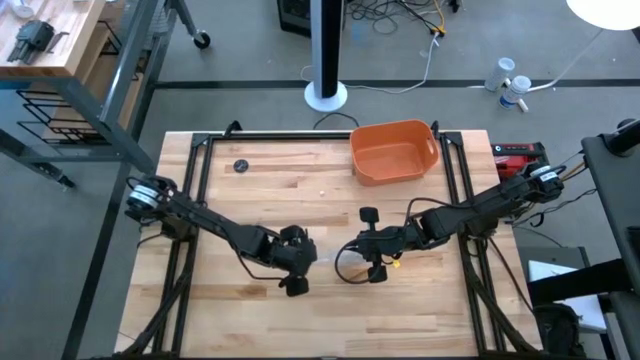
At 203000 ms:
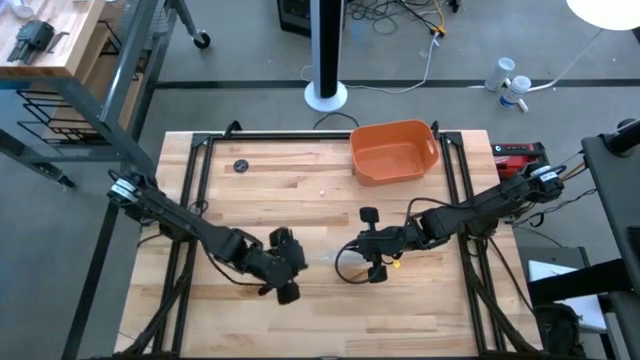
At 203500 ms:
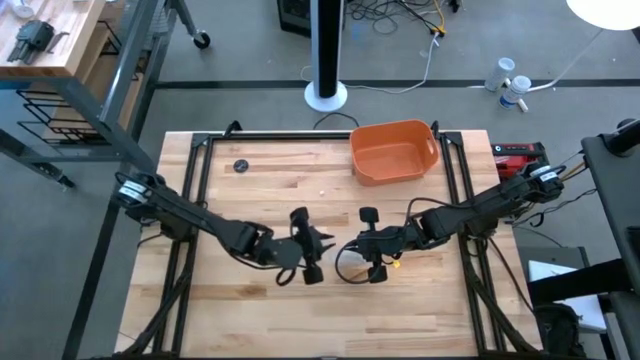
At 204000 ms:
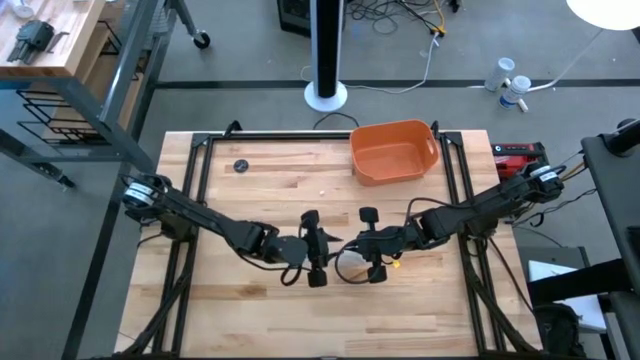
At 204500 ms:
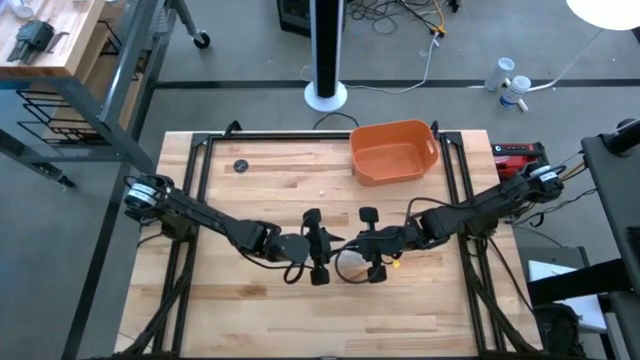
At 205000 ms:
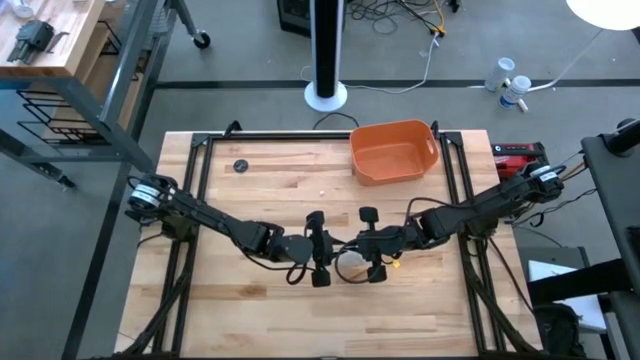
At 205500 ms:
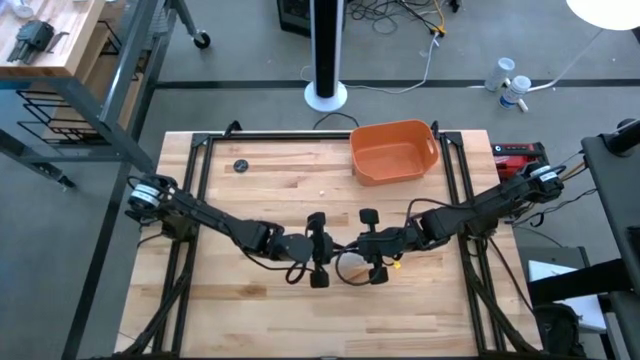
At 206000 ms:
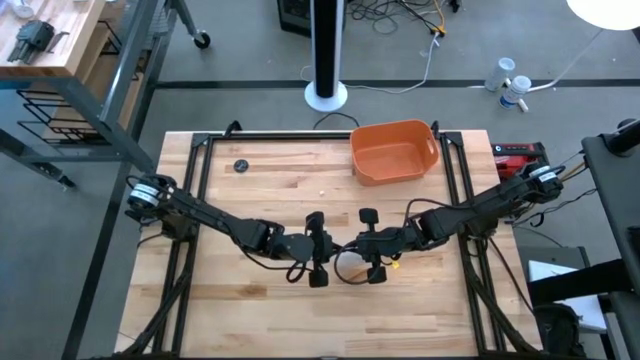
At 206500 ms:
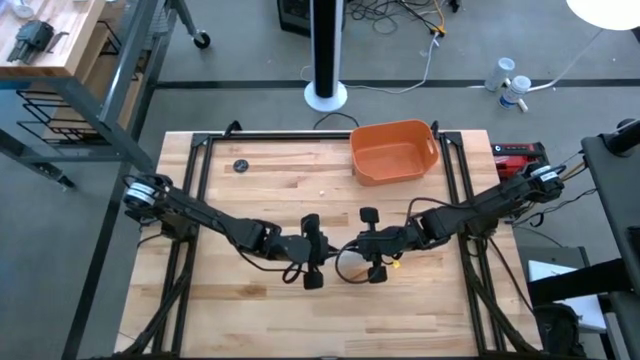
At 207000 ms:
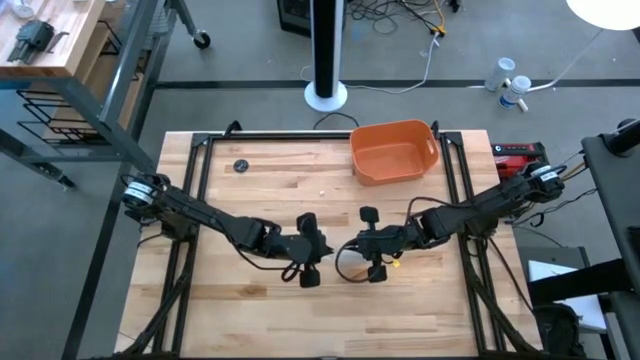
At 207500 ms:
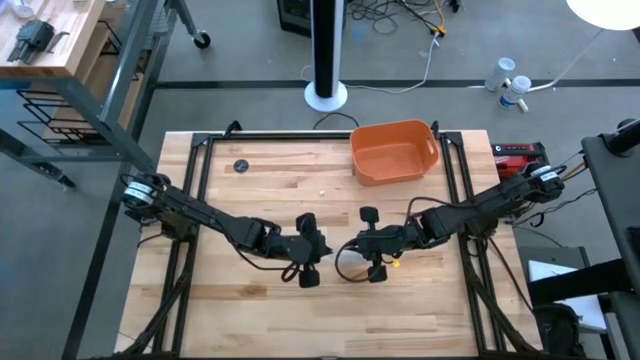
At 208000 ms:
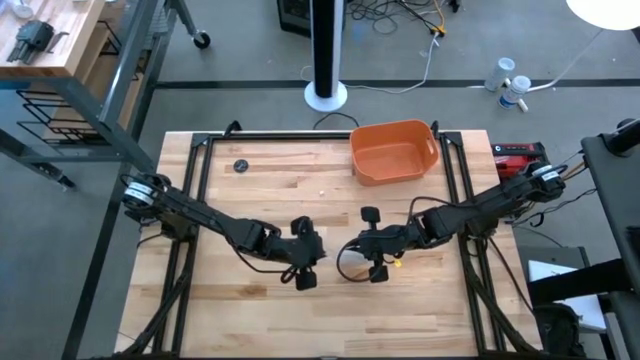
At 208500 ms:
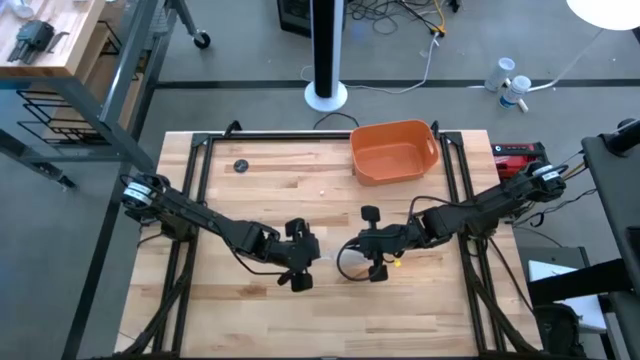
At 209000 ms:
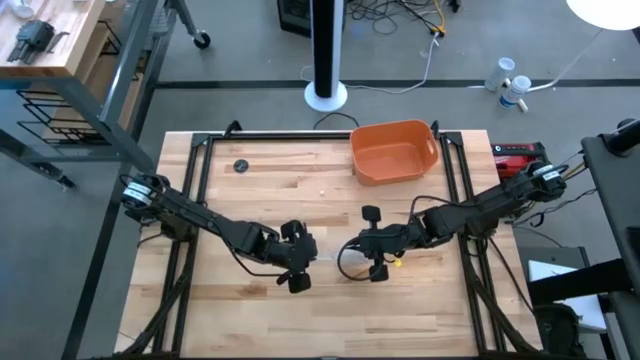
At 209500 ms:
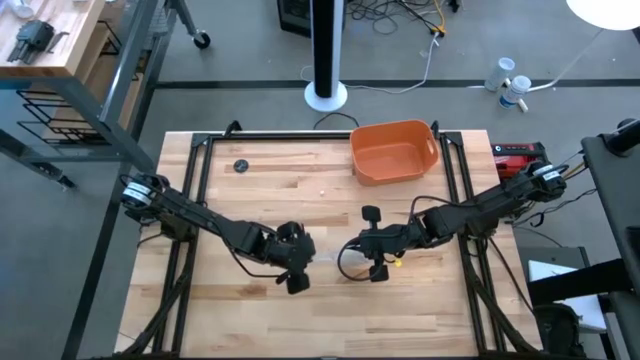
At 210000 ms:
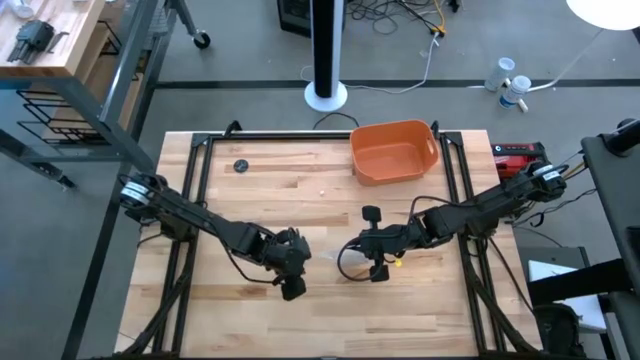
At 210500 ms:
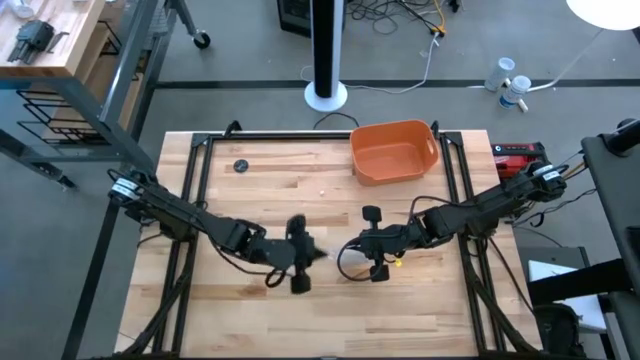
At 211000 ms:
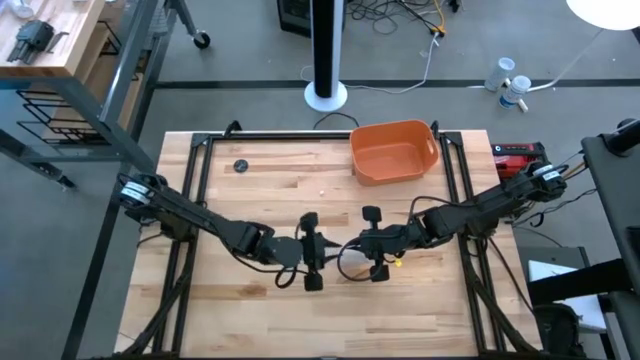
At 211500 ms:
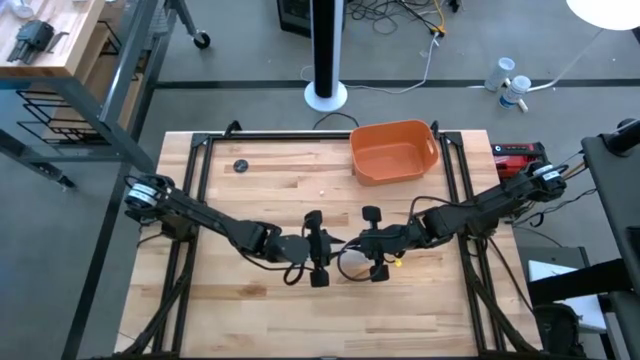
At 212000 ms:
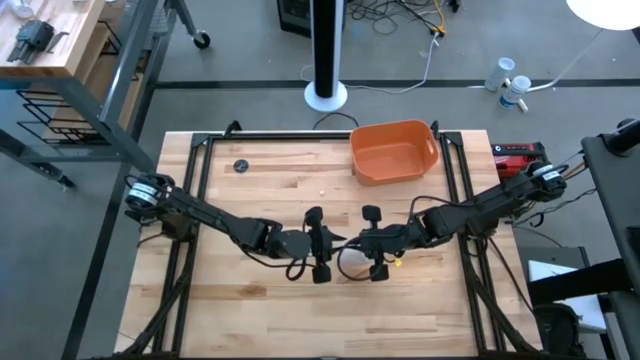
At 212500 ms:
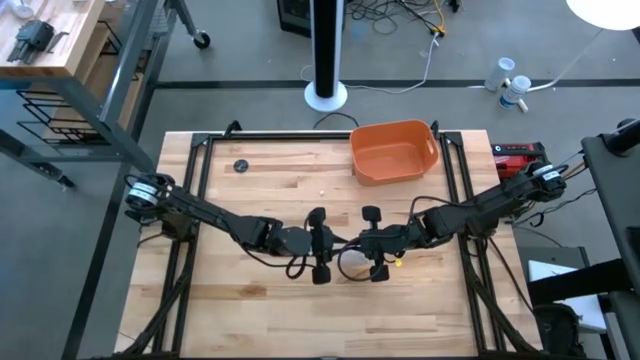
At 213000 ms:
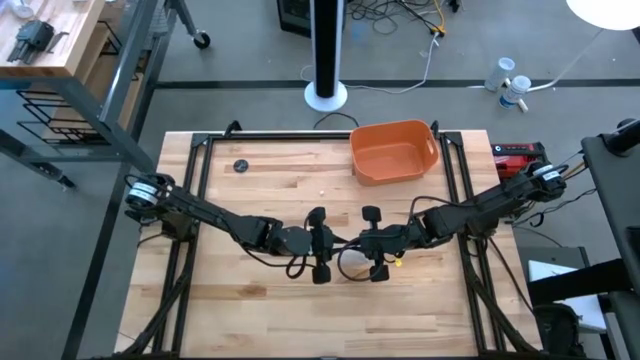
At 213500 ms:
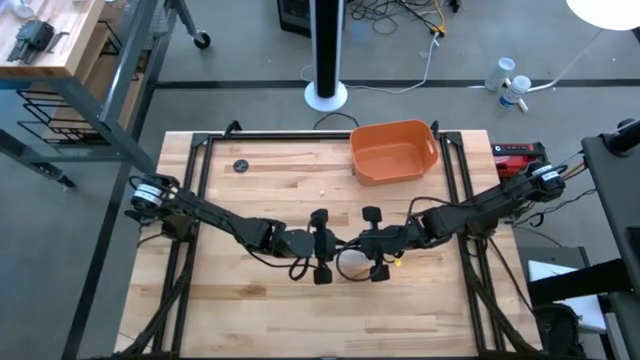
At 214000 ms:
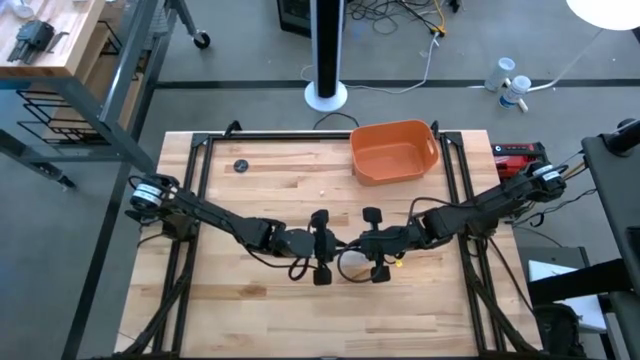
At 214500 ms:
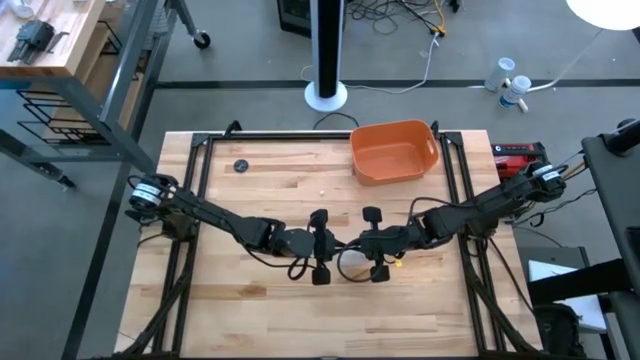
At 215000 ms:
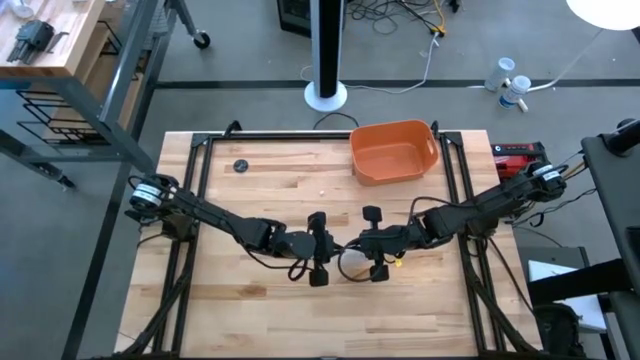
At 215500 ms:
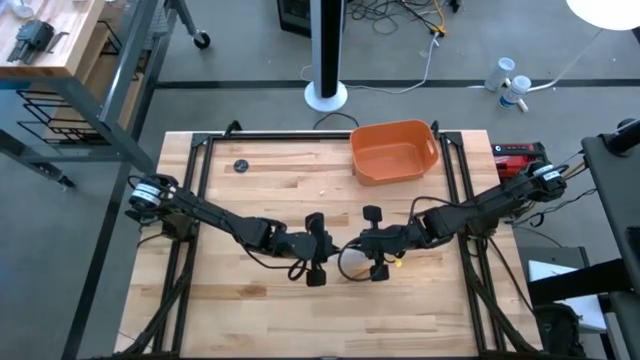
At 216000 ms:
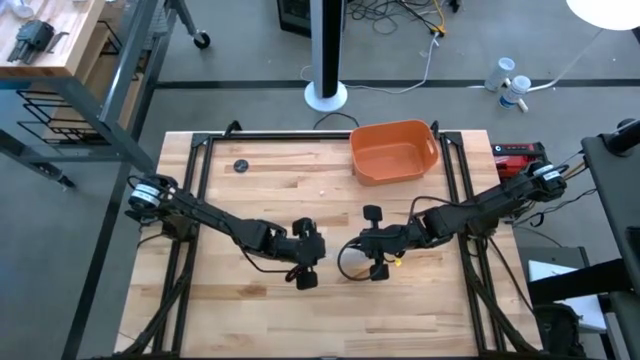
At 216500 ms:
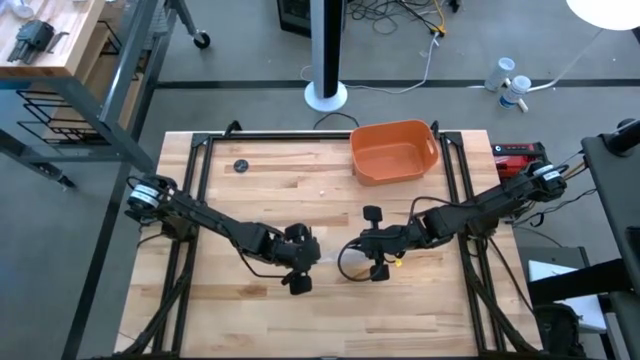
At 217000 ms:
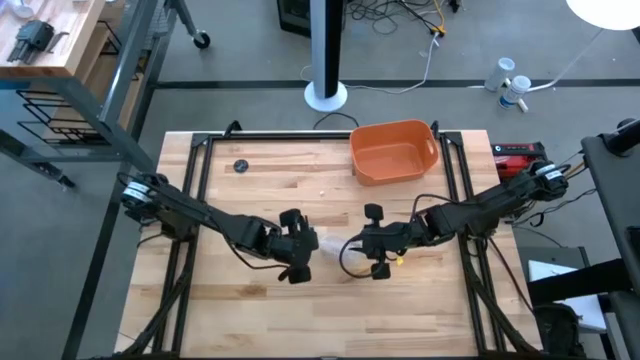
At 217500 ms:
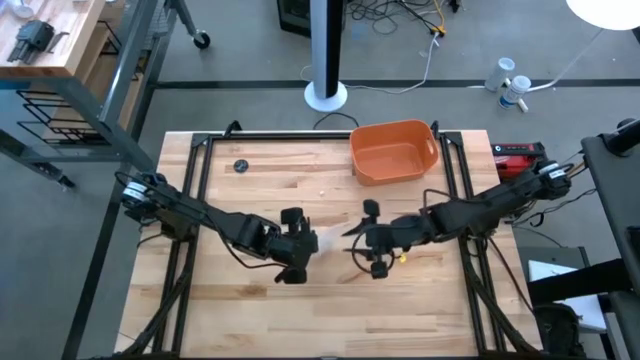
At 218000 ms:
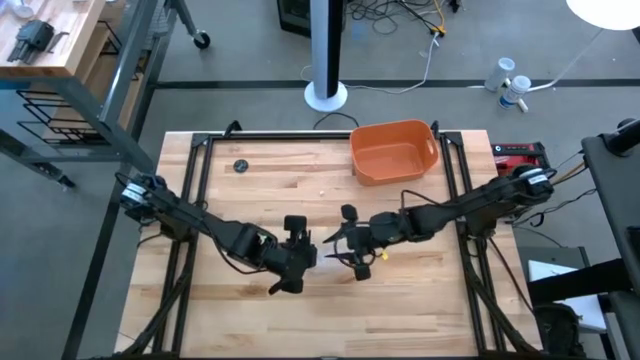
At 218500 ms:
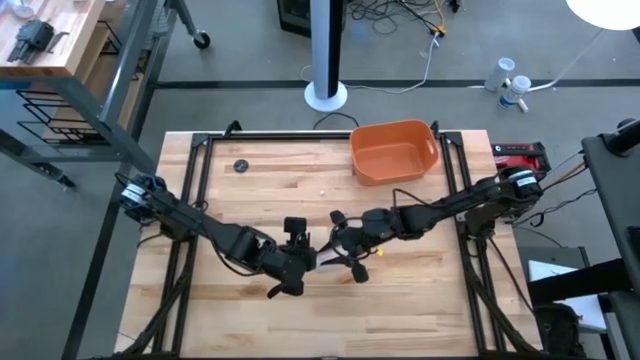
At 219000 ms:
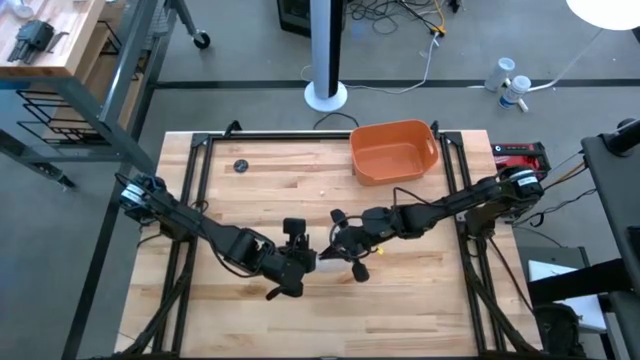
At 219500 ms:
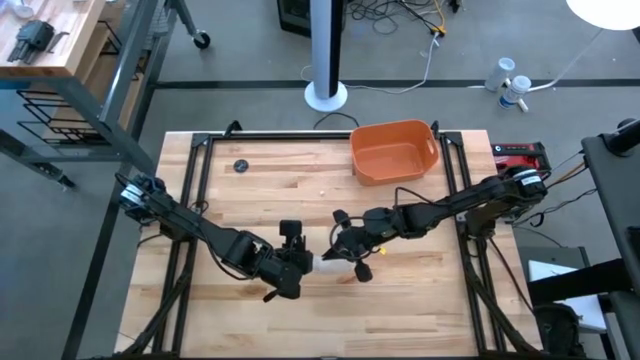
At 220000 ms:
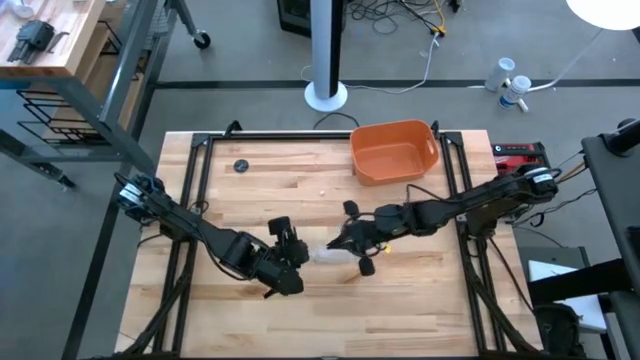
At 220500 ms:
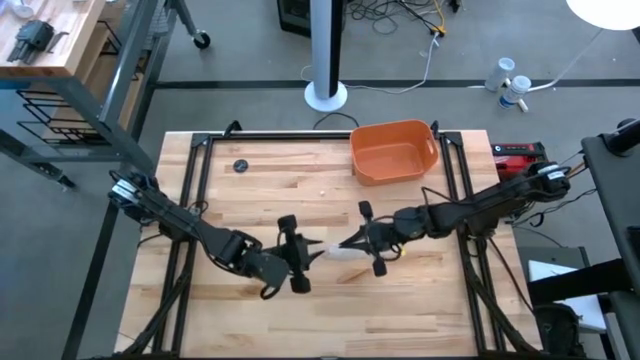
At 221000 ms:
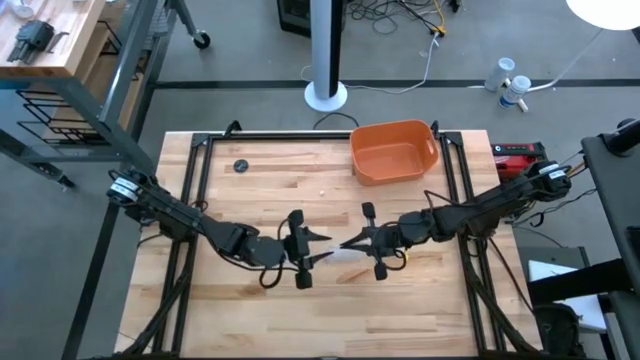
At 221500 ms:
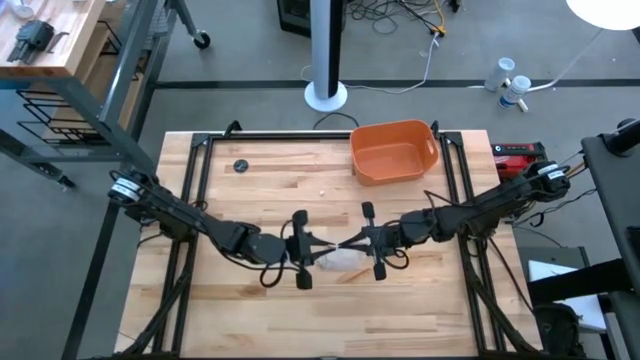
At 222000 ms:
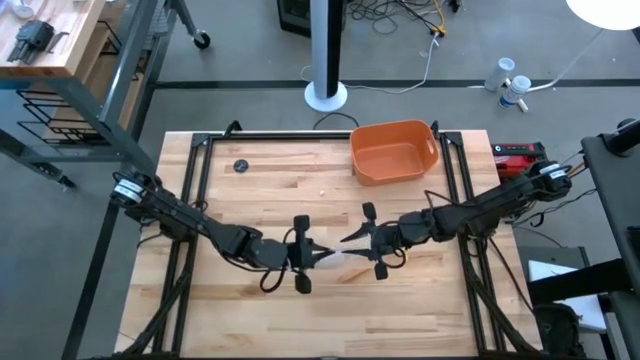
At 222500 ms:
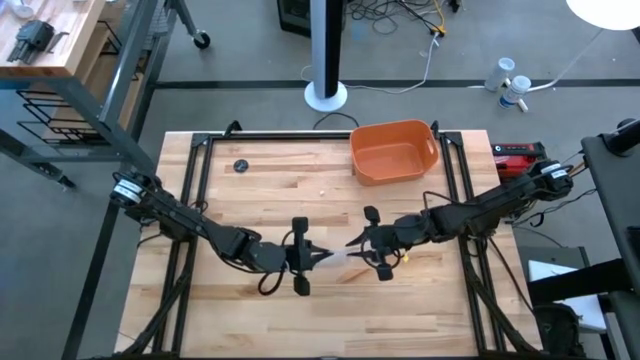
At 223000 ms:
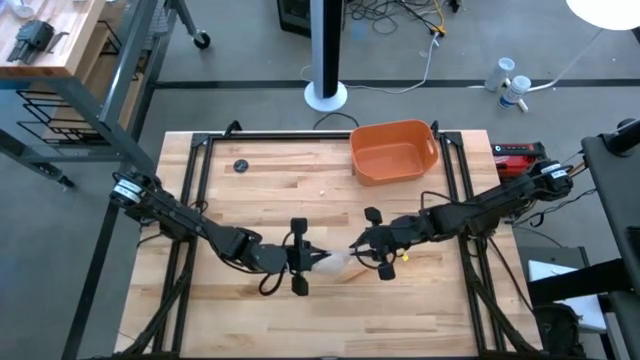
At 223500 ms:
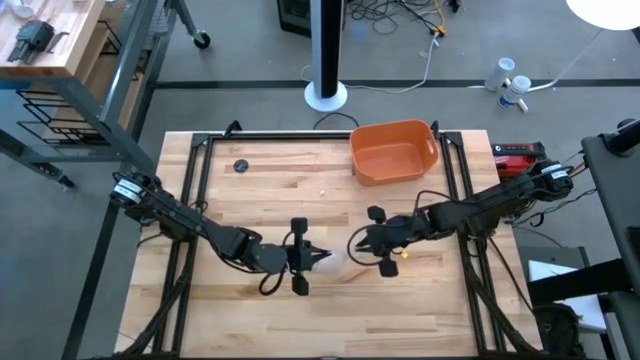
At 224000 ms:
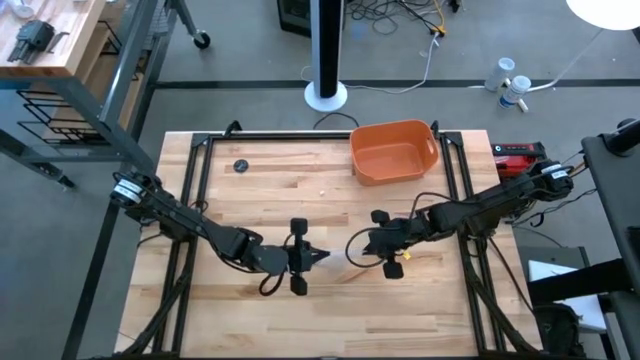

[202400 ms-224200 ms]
Task: Roll bandage
Close the transparent zip bag
